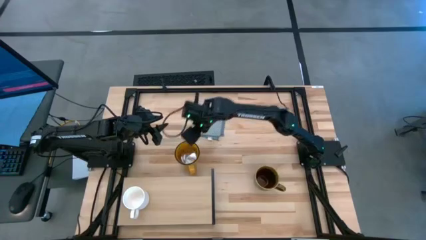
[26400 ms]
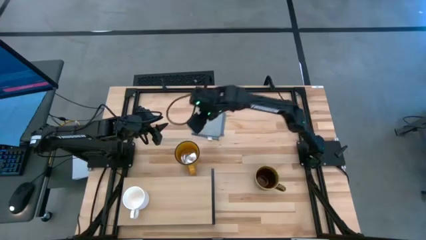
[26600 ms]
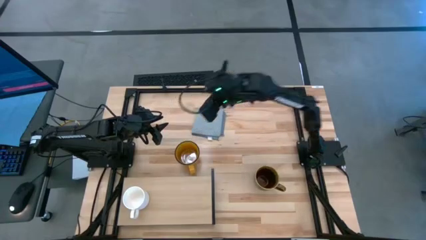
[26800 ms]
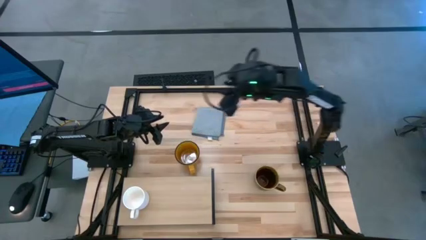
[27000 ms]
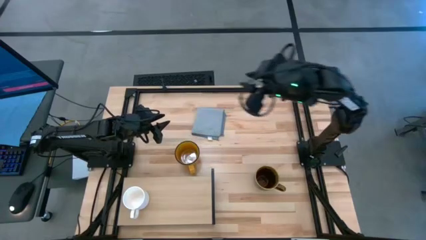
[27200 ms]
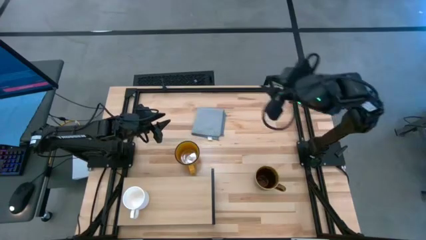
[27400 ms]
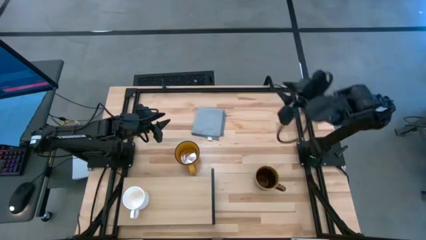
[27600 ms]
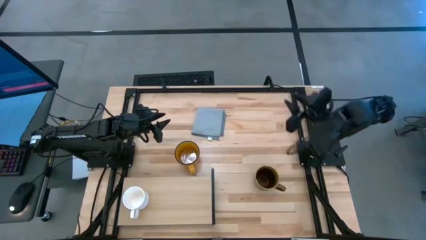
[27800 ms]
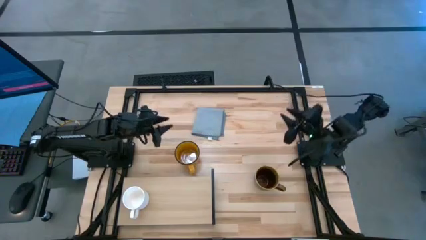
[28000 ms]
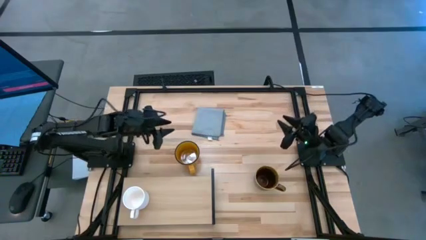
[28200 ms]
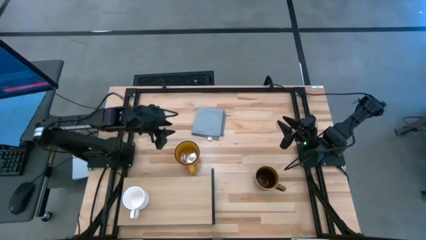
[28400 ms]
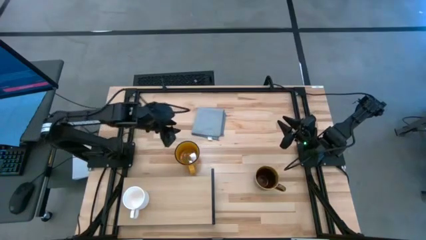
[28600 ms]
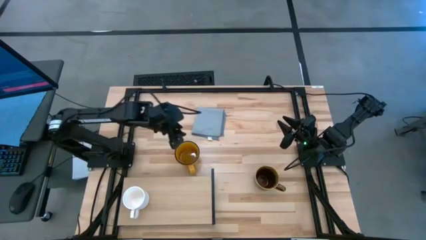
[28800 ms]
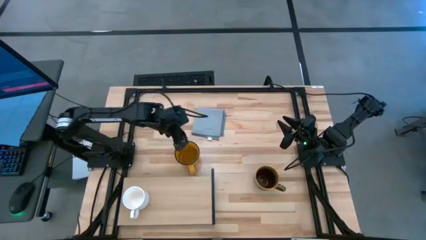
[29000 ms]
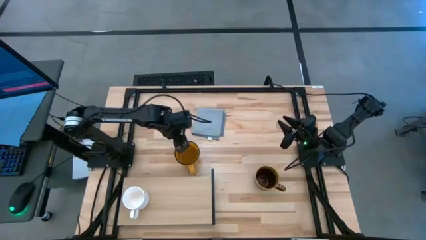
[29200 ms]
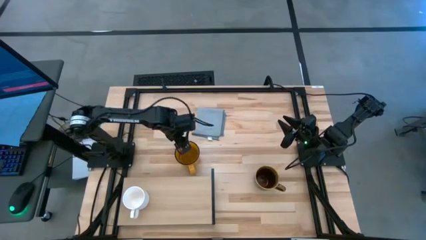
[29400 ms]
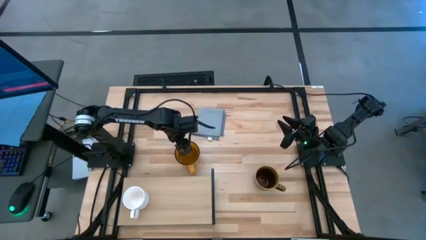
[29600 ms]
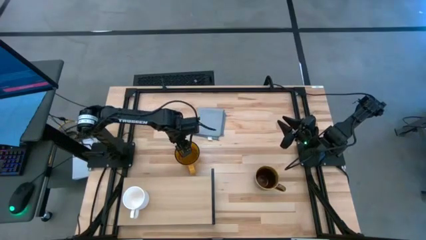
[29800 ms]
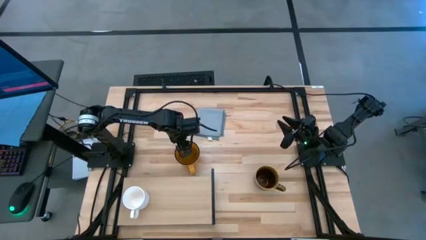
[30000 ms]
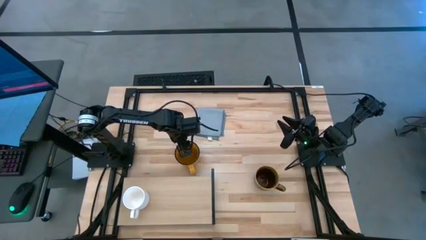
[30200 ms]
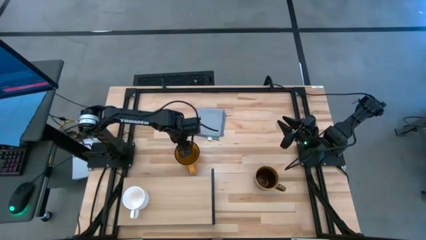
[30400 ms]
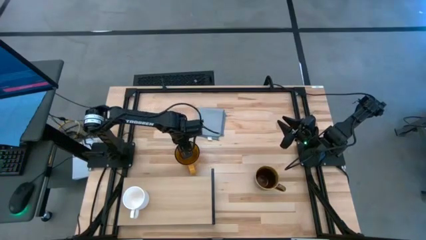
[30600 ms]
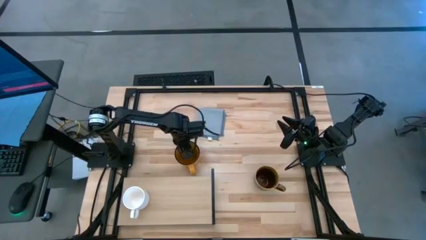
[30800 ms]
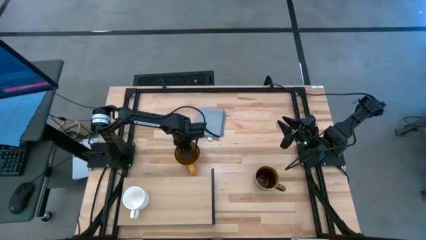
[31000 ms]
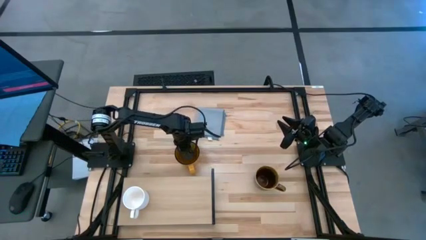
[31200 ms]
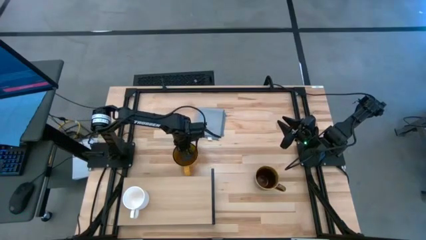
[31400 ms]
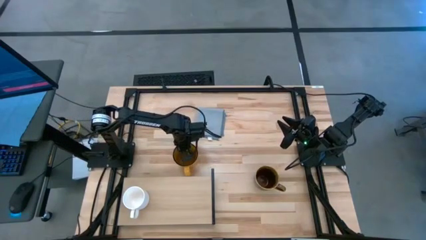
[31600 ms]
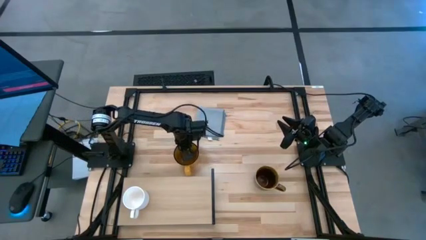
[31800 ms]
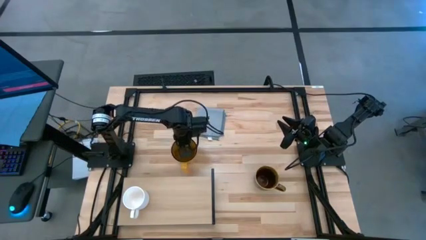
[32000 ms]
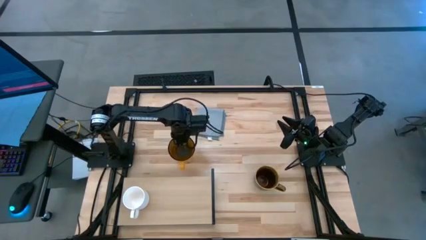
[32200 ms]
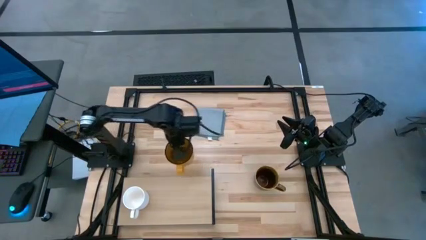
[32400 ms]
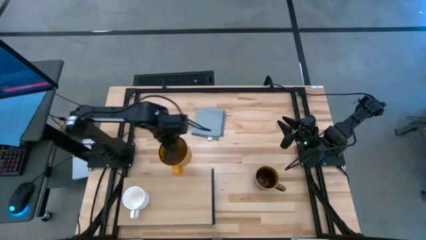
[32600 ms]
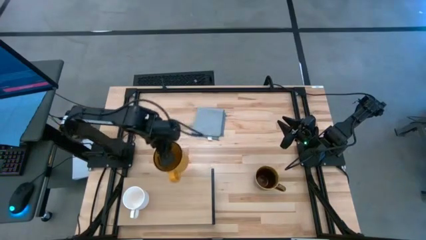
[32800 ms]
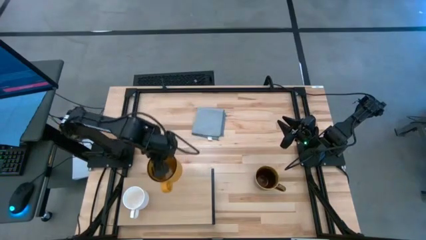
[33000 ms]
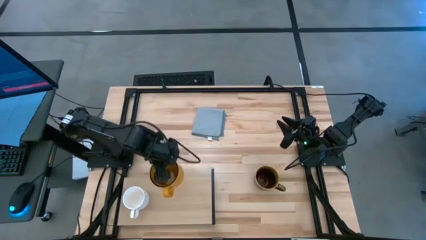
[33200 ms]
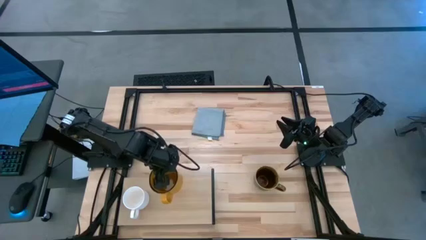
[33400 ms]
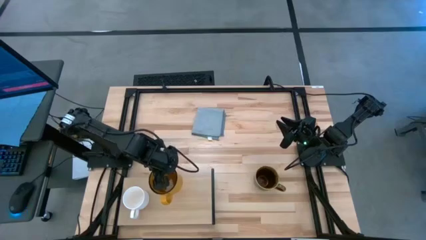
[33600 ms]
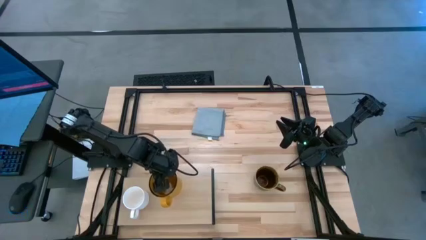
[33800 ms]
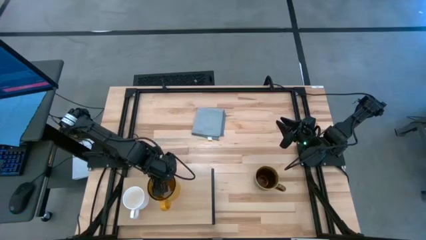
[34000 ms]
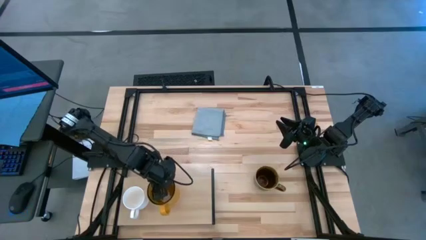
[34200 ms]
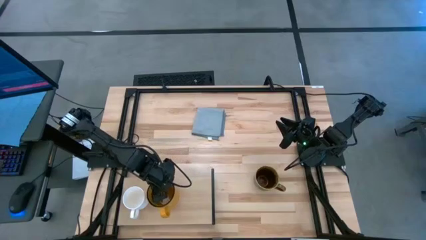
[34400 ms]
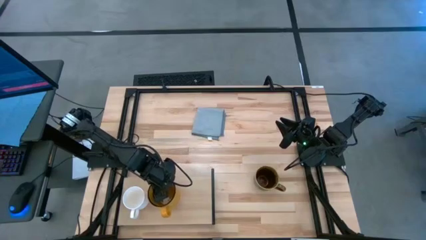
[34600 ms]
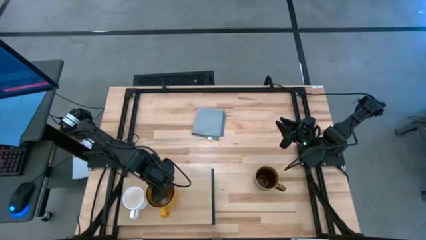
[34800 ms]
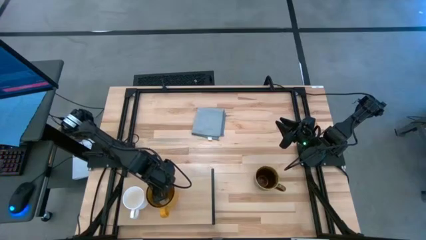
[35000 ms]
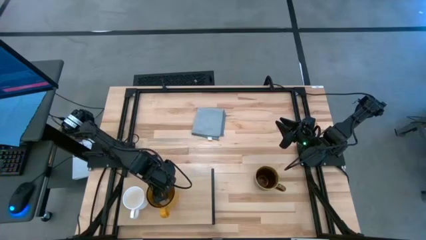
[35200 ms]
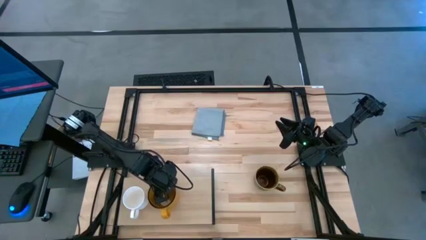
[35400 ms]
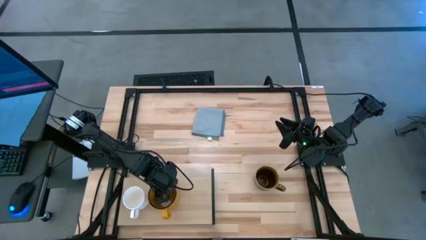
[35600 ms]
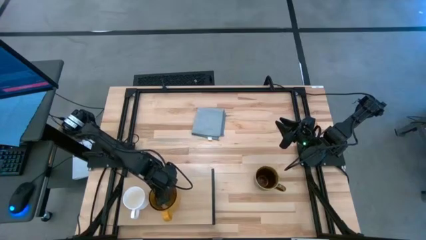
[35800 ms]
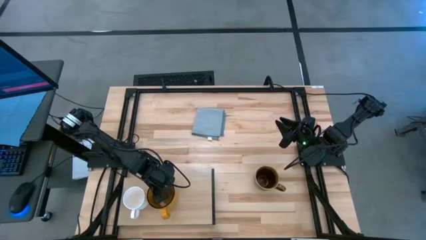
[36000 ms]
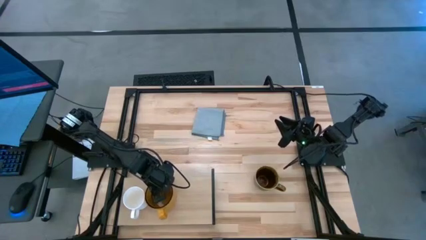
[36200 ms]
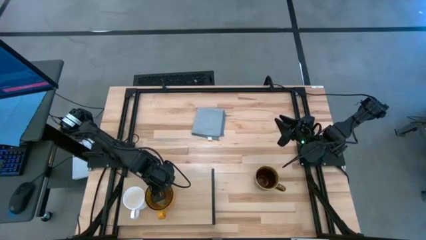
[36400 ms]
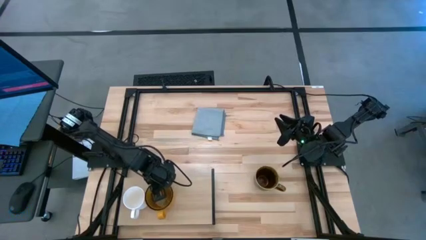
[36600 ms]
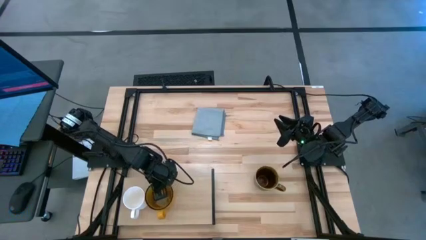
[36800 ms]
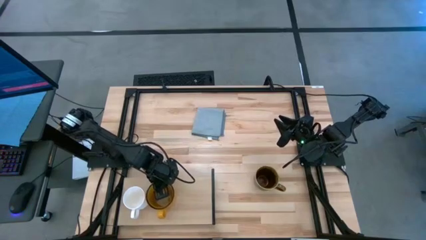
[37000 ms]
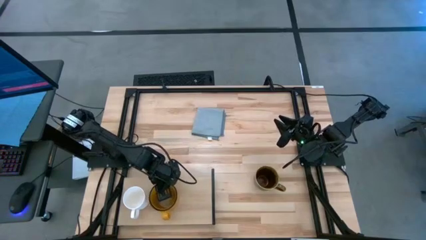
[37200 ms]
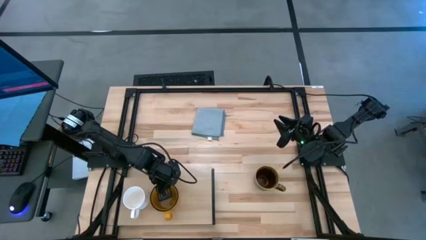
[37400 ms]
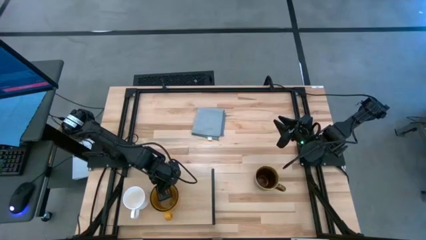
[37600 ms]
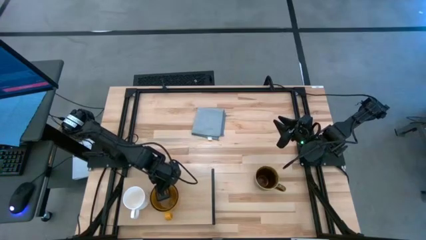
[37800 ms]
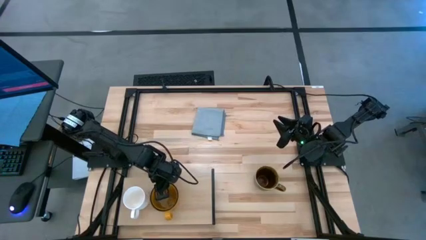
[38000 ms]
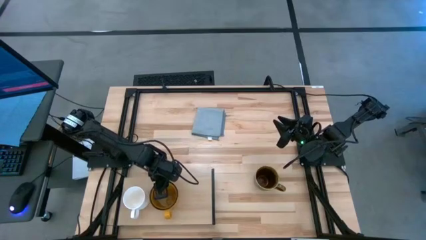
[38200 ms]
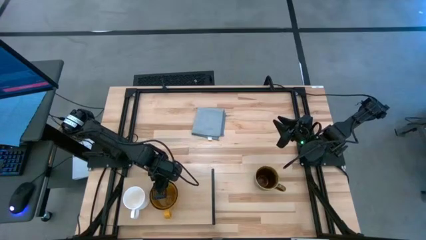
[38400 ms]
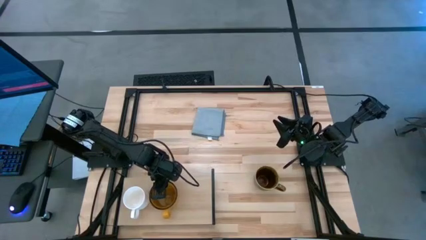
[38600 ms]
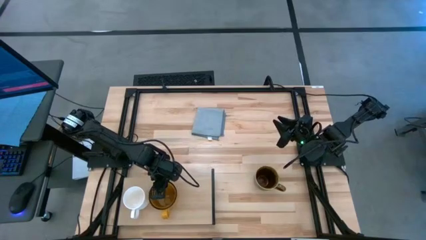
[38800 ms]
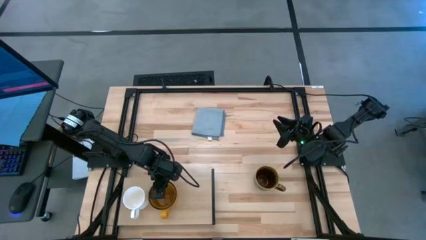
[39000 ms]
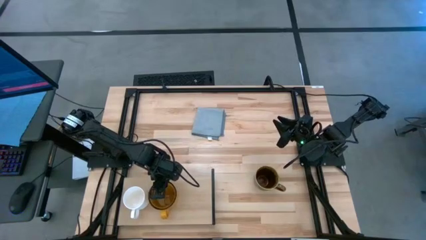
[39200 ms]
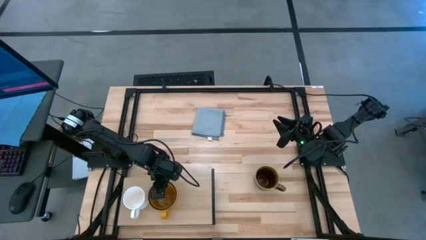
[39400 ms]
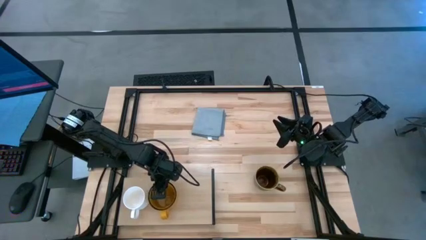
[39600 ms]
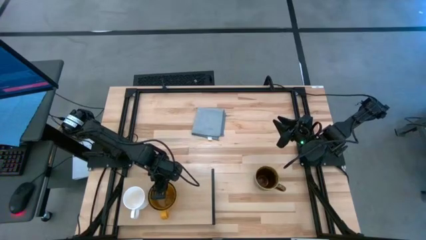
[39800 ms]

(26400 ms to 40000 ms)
Task: Stack small to large cups/mugs on shelf
Put the yellow mug on the shelf

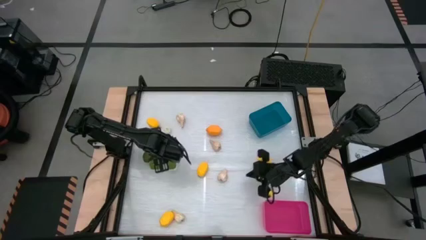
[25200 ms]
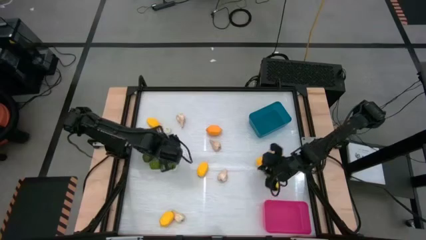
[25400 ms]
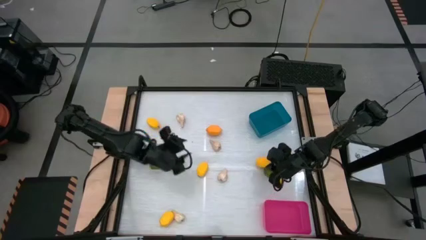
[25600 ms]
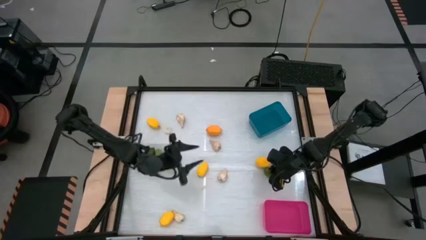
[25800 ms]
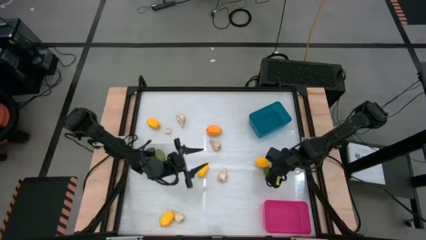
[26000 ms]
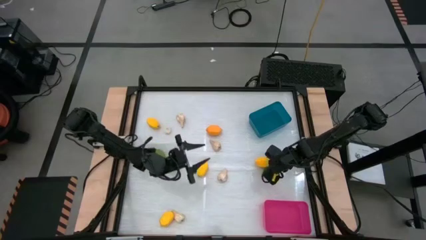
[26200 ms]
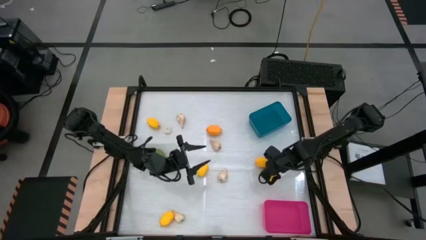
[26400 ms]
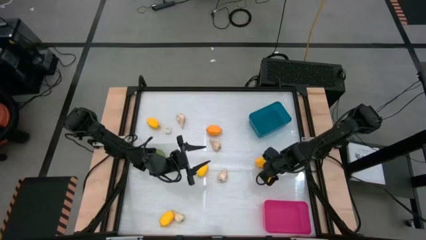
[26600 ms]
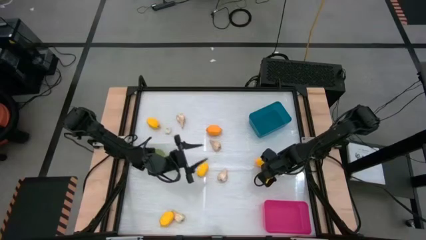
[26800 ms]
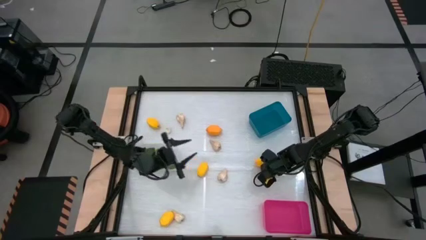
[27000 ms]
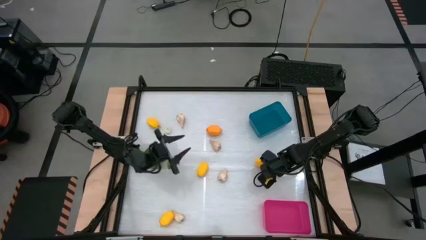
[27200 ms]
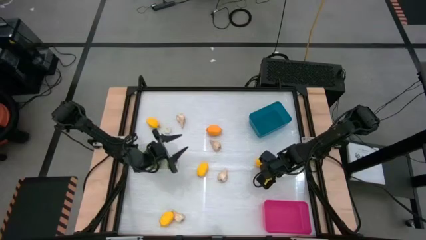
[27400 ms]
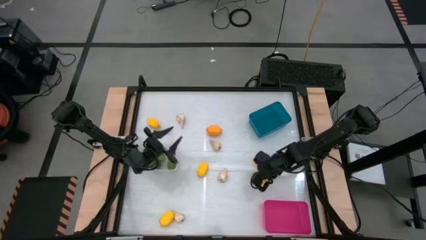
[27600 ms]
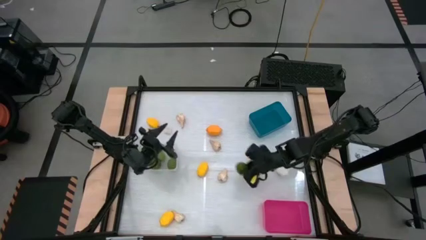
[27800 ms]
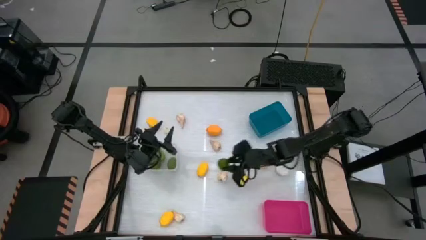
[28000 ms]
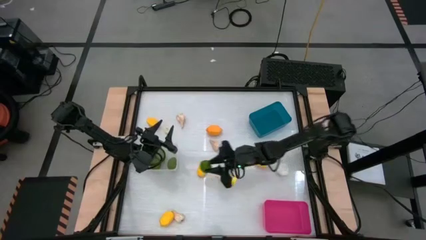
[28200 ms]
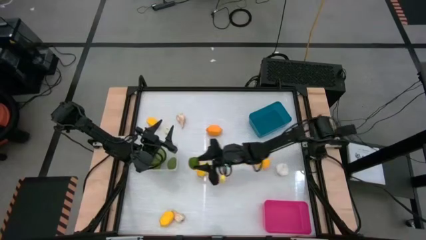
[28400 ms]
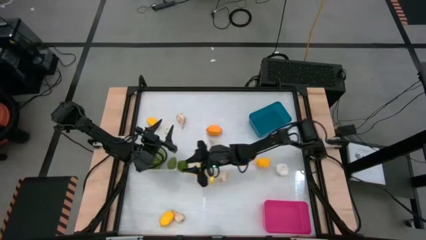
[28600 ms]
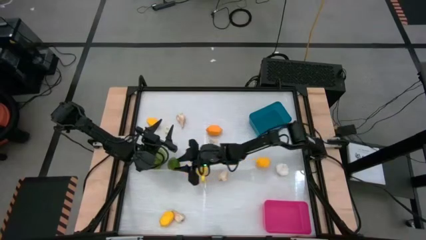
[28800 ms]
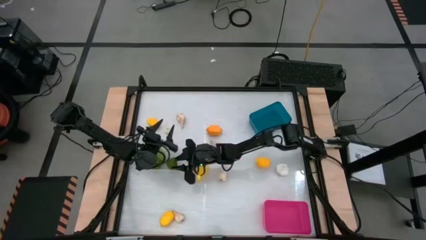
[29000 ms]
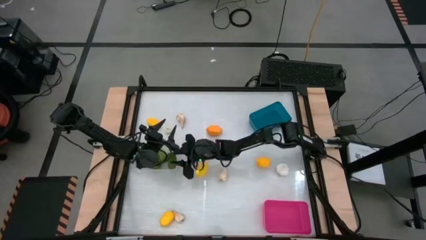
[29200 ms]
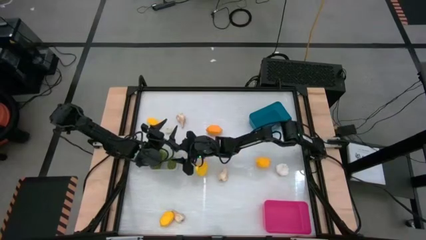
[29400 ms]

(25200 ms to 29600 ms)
Task: Sort produce into baskets
Put the green lime into the transparent bin
